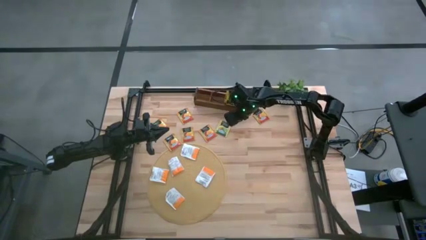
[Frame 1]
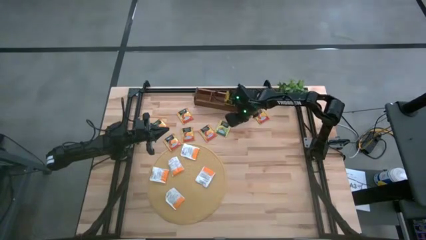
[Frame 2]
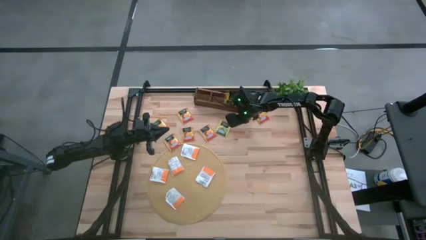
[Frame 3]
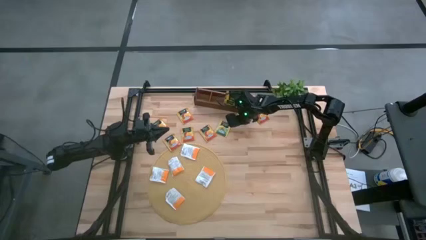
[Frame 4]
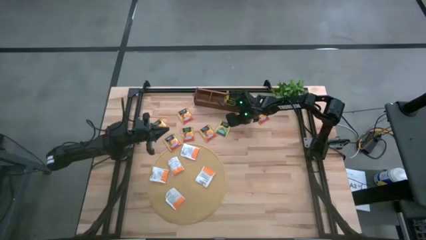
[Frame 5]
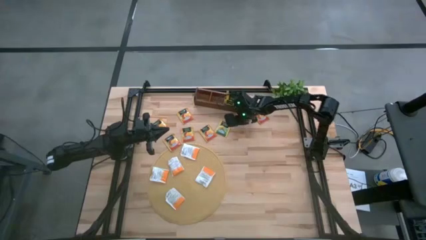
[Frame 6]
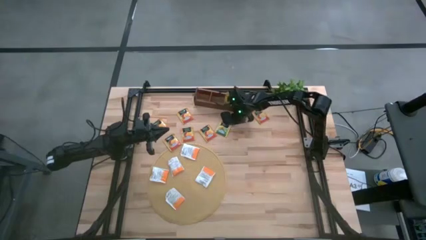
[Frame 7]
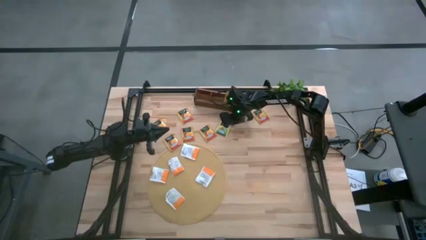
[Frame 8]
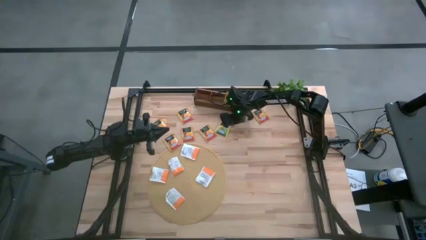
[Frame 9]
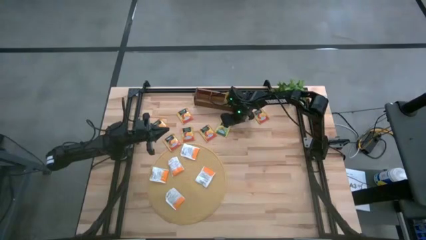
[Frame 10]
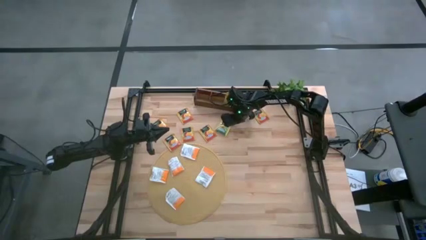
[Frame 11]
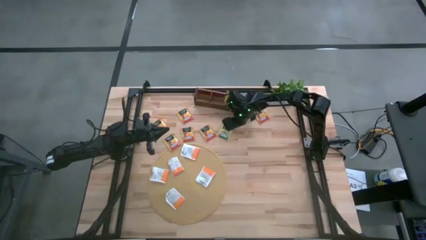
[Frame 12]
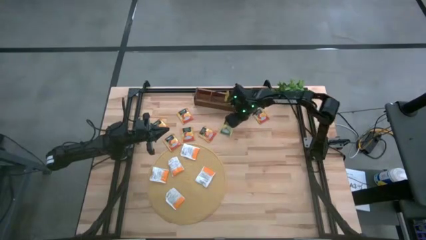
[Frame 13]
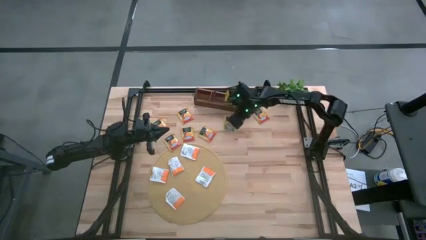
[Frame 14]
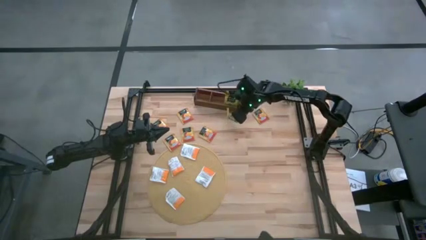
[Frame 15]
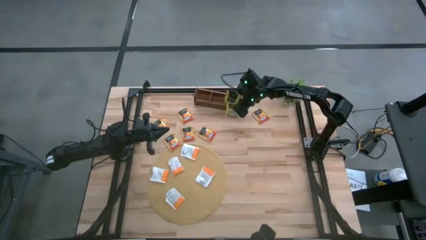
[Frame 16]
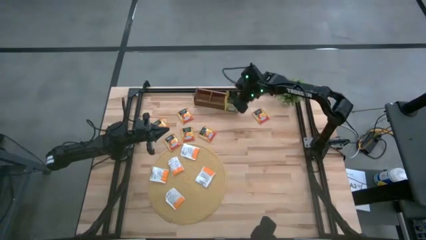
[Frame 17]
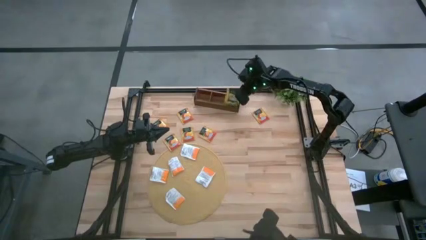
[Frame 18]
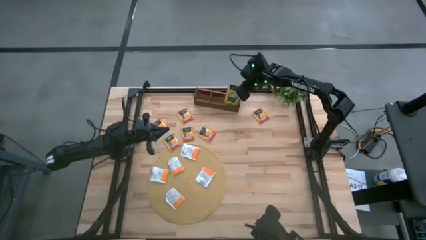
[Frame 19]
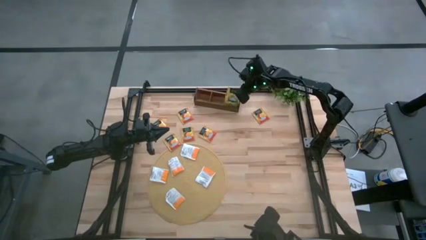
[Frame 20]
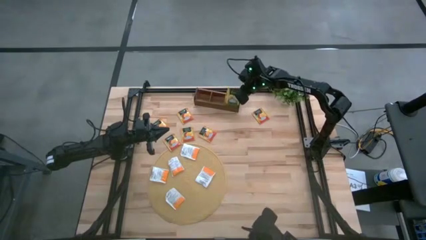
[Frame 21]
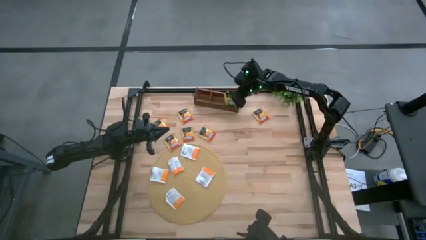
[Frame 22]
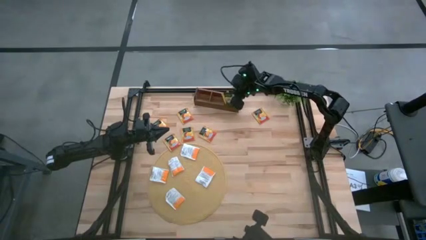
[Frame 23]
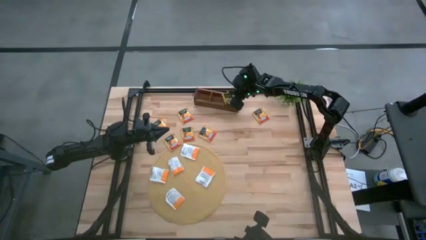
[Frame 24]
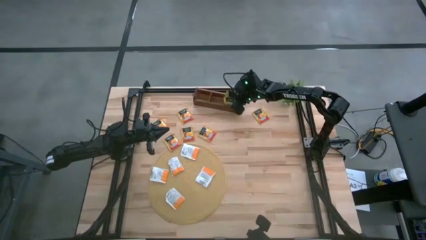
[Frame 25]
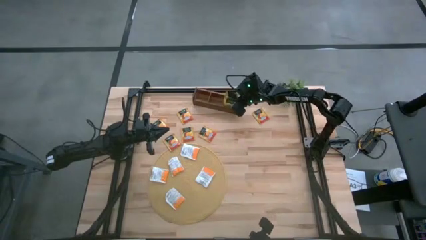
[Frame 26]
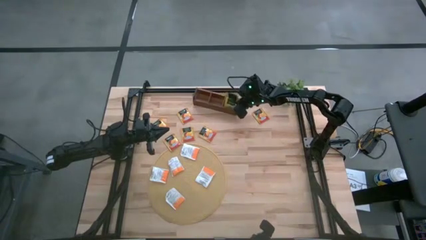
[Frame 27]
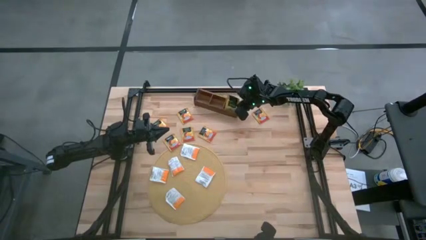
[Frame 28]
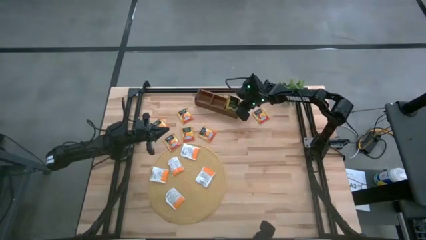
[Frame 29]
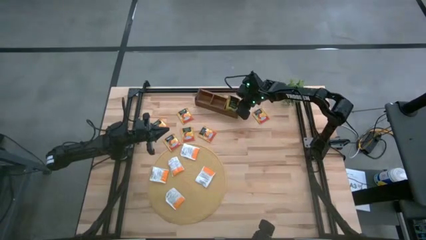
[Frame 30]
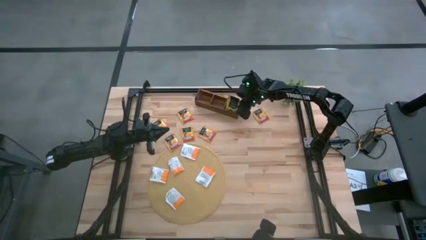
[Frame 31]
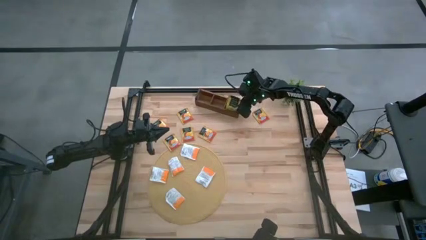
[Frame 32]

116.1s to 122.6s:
Task: Pick & Place Tea
Put the green tea sachet into the right of the wooden organizer

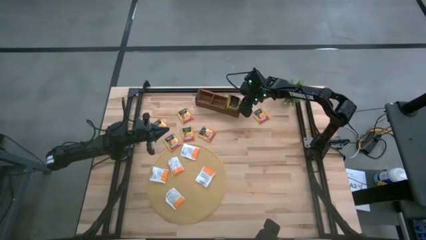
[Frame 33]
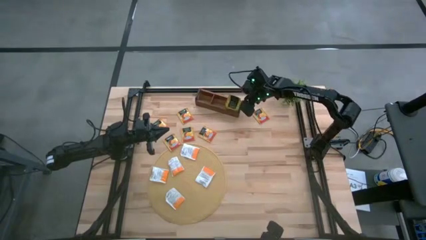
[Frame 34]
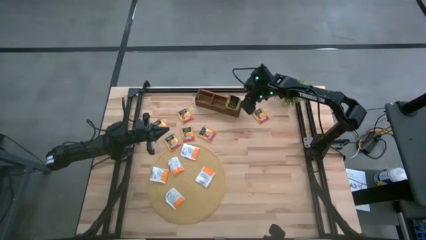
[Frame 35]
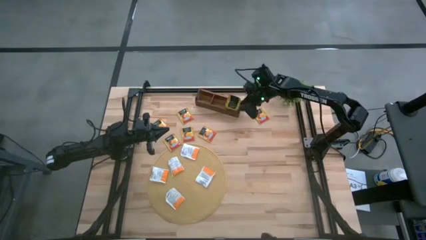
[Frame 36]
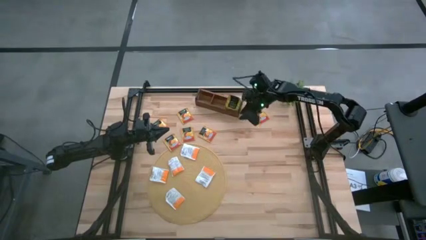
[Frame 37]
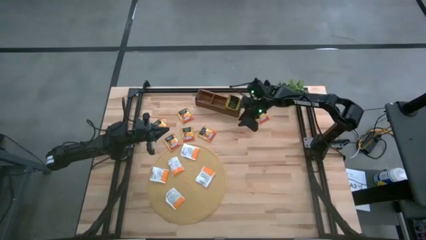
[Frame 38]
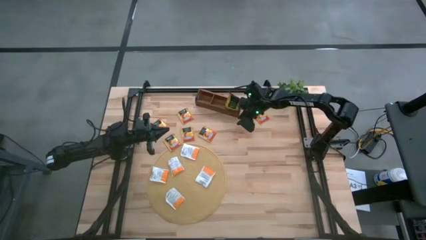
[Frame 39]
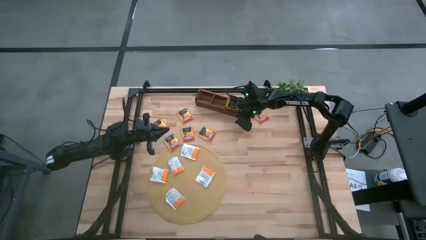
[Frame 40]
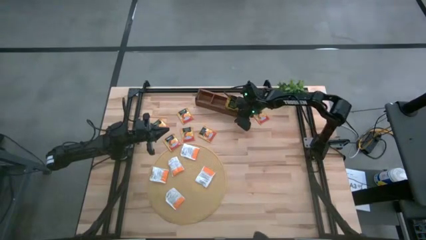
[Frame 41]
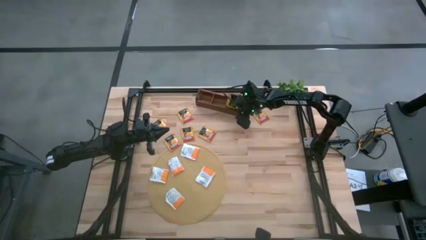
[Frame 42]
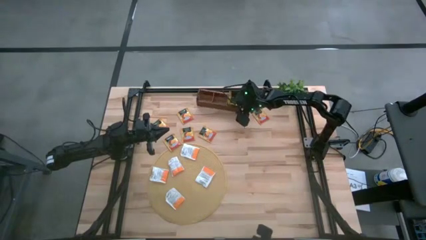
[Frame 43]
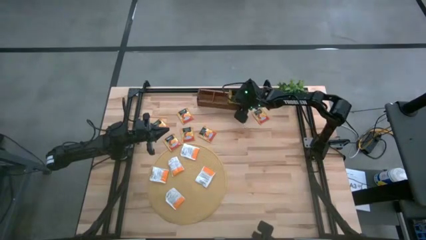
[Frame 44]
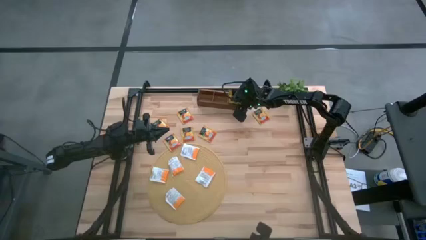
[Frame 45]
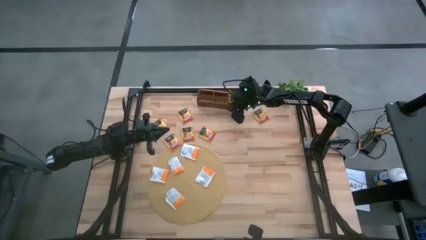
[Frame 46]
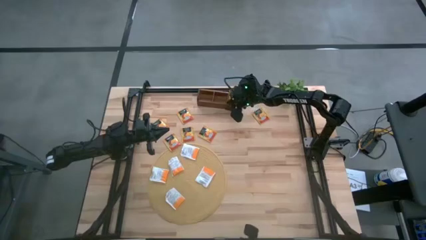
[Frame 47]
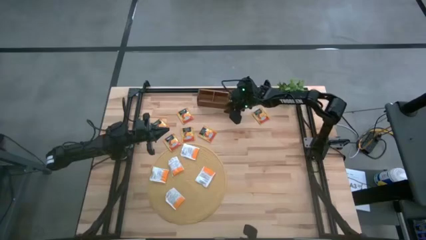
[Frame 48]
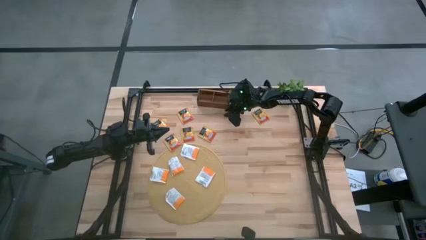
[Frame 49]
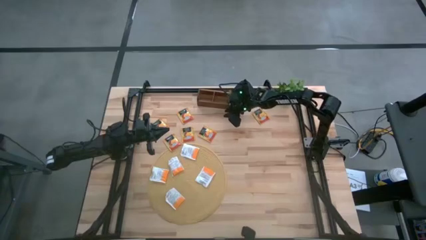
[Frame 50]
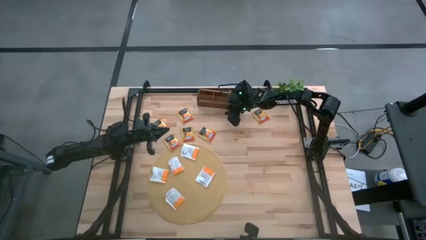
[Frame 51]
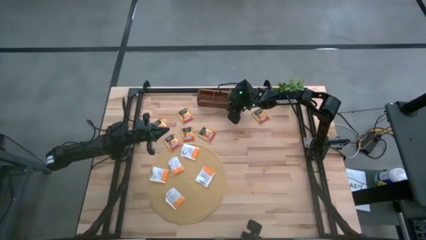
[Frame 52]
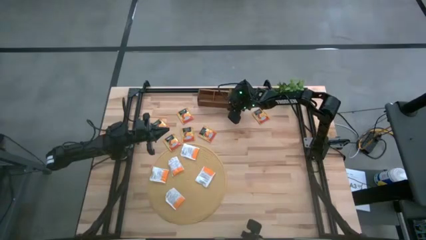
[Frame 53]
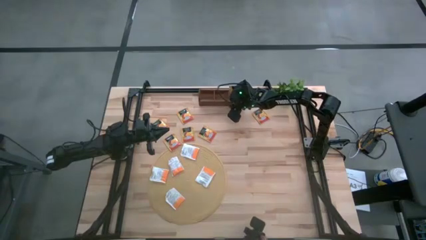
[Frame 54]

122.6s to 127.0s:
Adjust the wooden organizer on the table

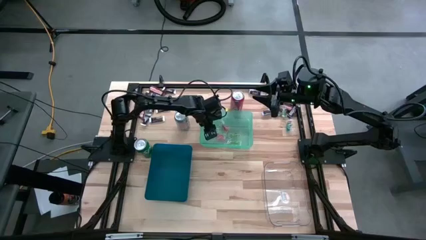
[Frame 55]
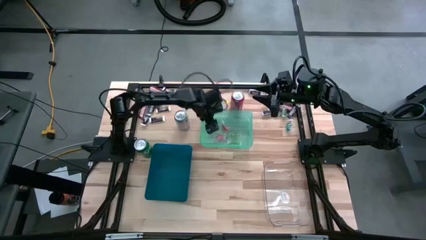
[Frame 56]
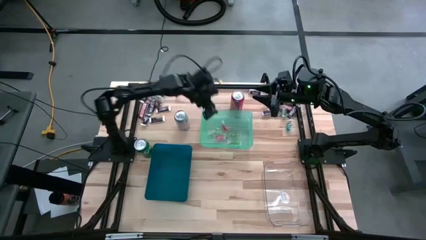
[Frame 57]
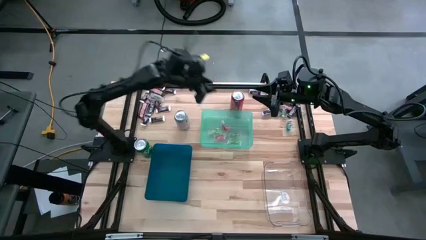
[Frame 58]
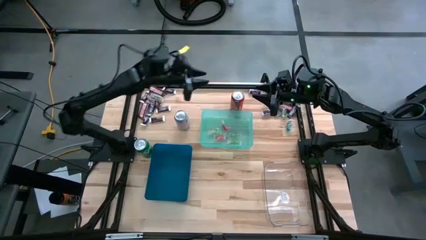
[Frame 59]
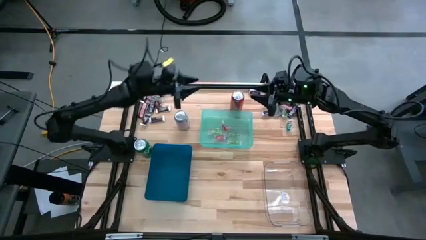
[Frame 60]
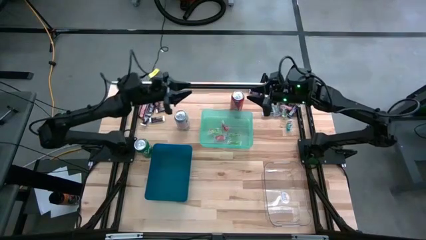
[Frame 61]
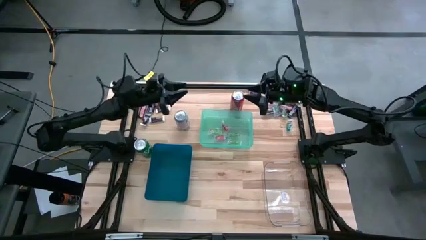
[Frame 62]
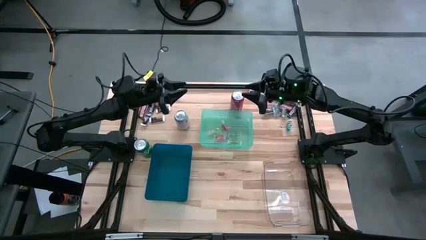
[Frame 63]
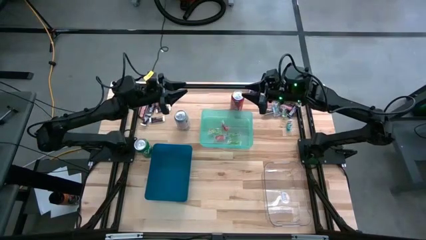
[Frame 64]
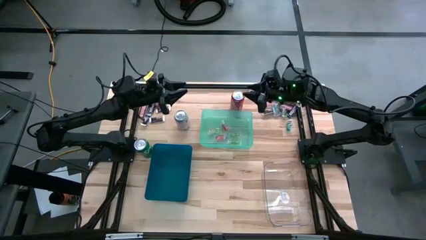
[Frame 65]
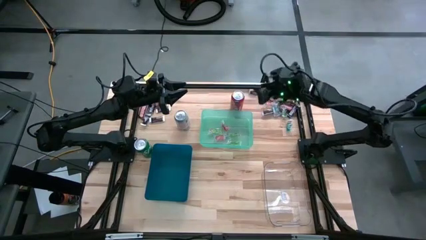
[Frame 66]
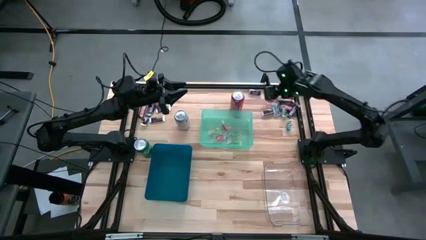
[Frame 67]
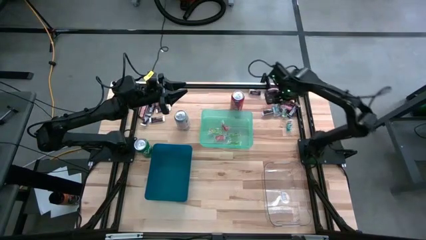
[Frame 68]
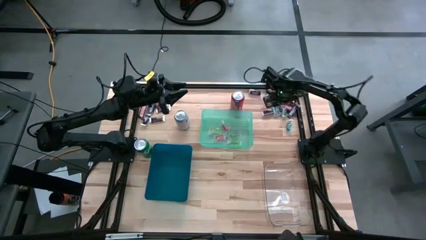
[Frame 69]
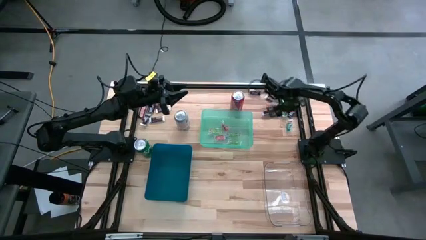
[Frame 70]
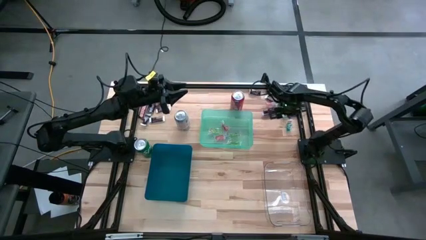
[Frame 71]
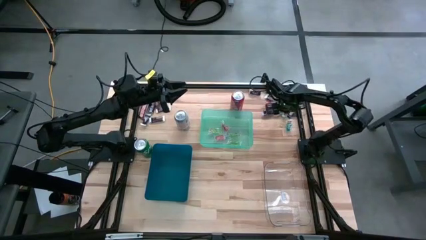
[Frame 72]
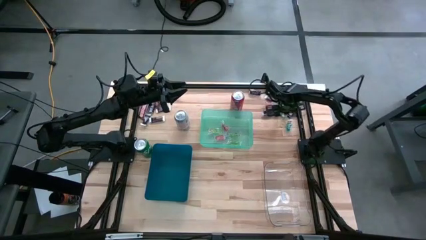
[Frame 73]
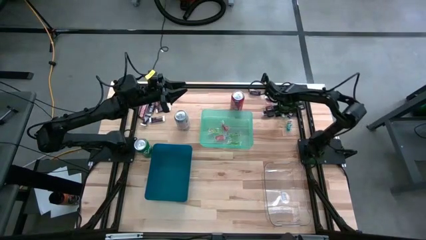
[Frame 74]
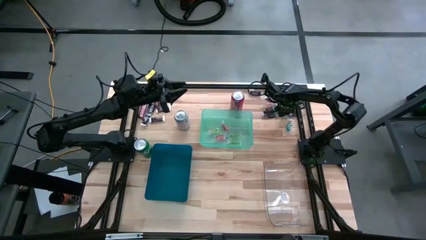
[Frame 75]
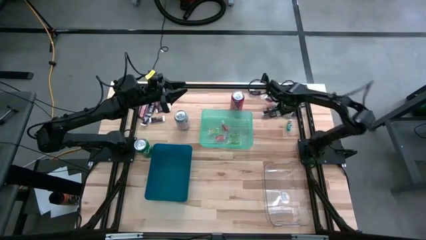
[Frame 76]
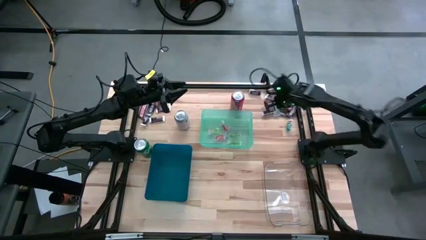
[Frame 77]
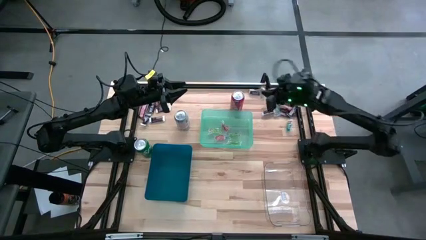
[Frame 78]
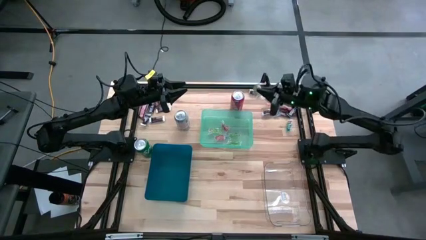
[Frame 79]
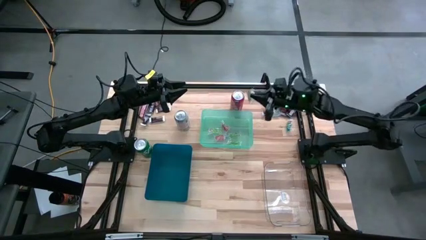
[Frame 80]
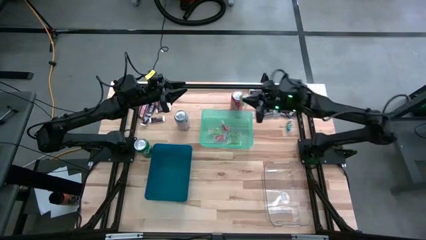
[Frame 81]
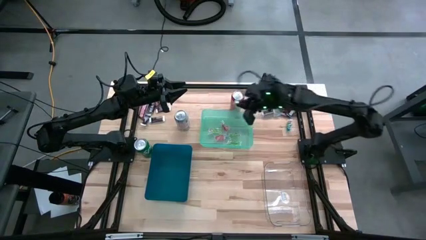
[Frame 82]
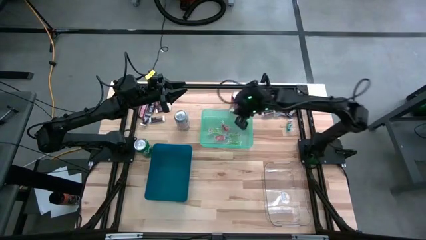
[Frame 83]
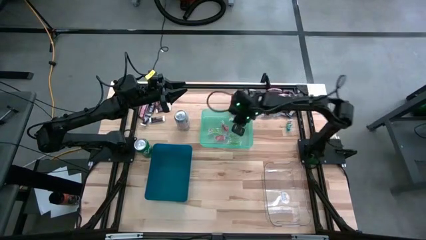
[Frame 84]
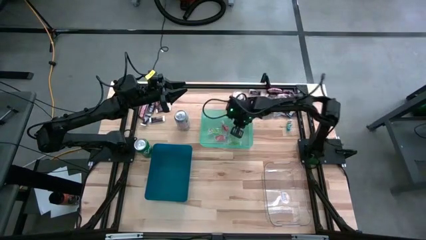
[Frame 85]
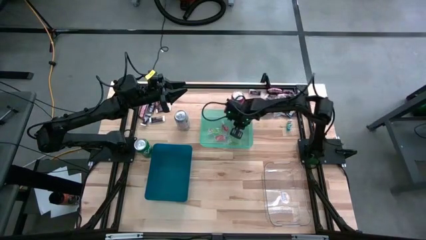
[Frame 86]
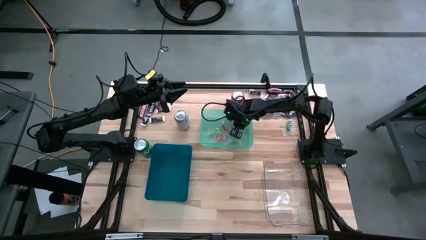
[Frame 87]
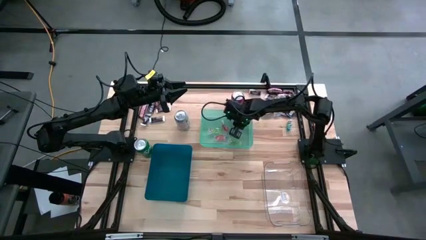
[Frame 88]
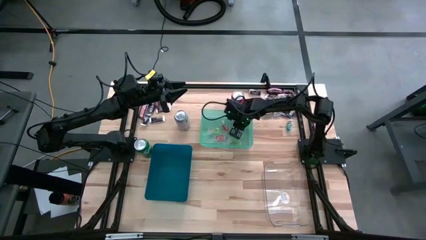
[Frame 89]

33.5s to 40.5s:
Task: Organize candy in baskets
Put the green gummy into the green bin
